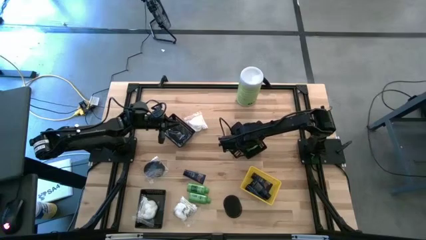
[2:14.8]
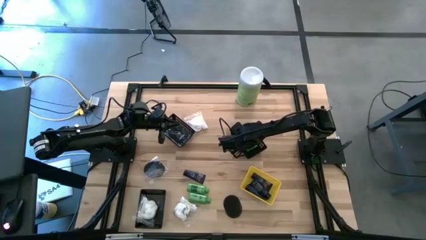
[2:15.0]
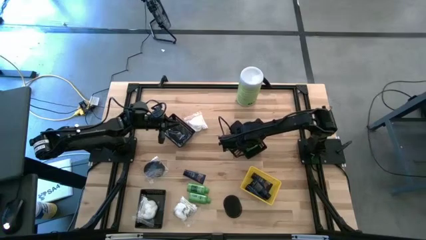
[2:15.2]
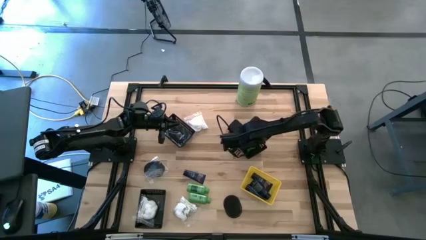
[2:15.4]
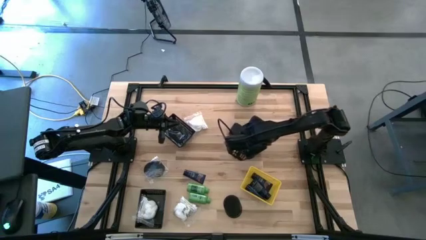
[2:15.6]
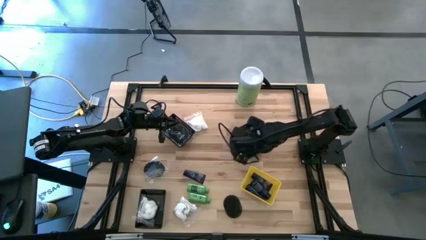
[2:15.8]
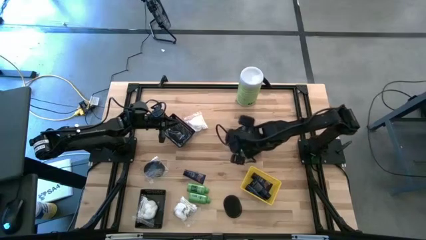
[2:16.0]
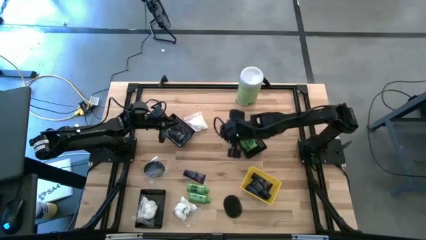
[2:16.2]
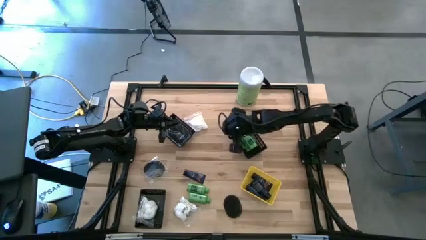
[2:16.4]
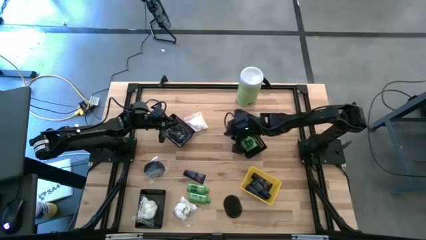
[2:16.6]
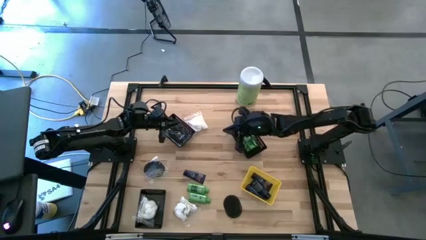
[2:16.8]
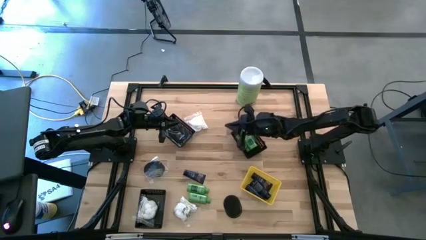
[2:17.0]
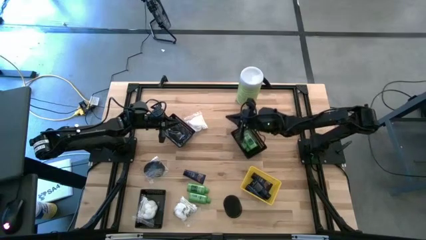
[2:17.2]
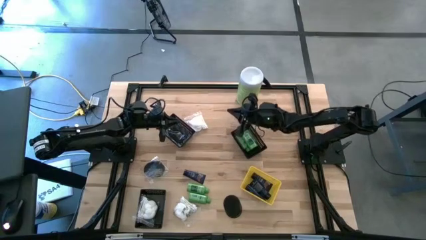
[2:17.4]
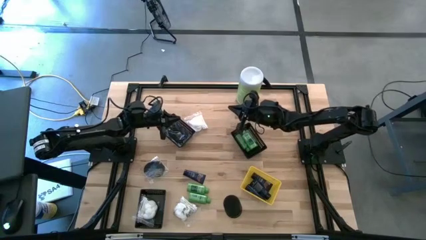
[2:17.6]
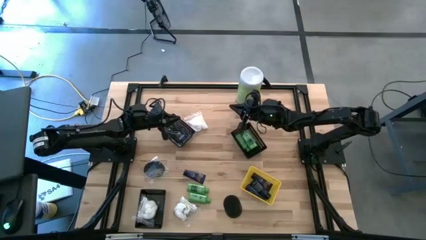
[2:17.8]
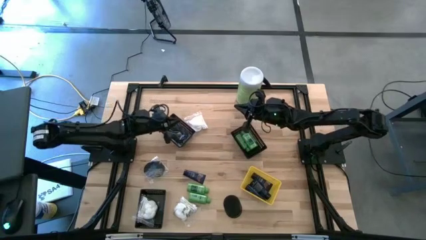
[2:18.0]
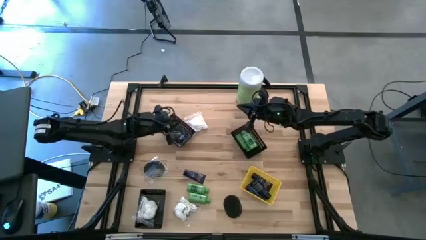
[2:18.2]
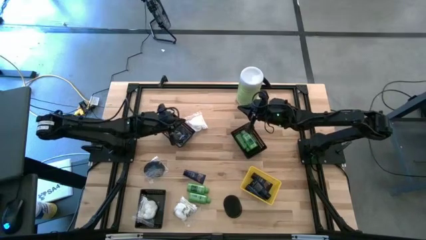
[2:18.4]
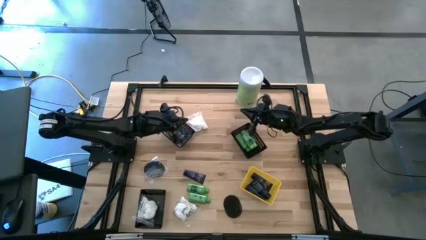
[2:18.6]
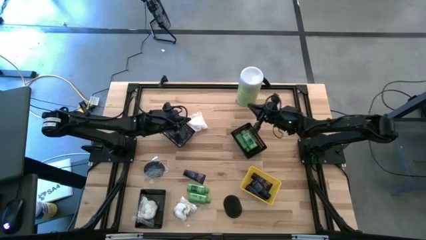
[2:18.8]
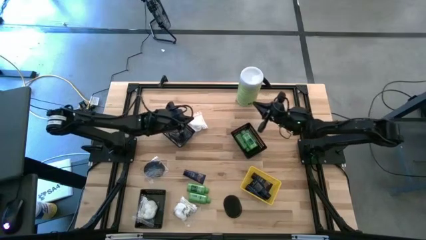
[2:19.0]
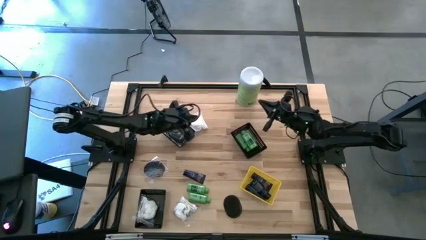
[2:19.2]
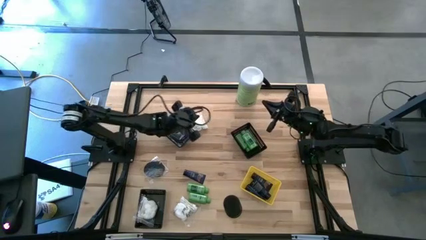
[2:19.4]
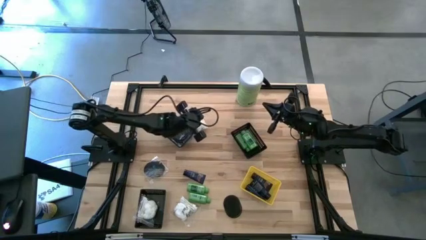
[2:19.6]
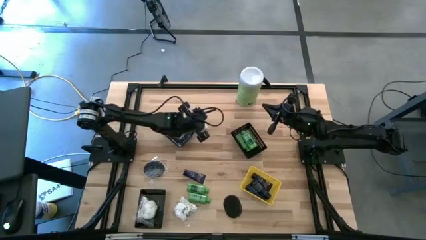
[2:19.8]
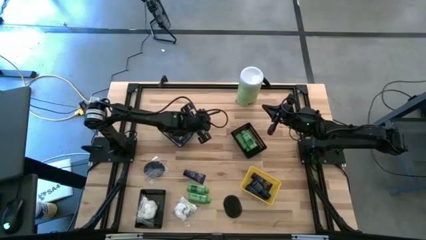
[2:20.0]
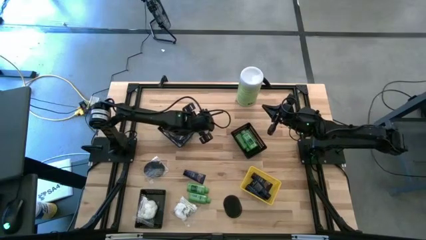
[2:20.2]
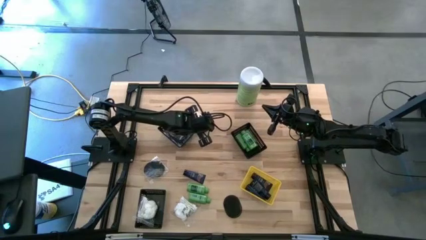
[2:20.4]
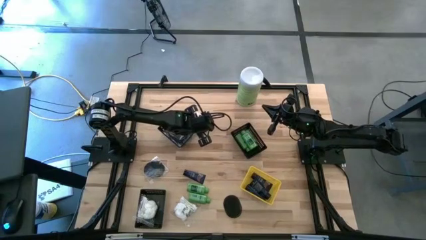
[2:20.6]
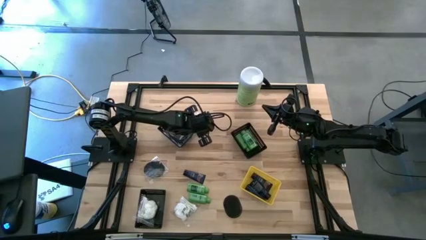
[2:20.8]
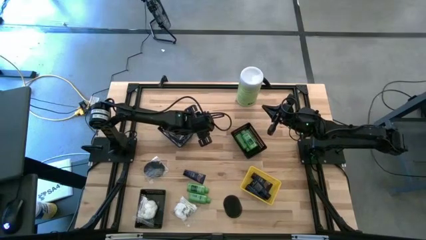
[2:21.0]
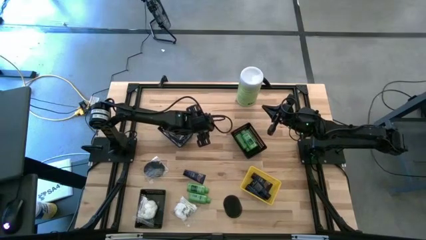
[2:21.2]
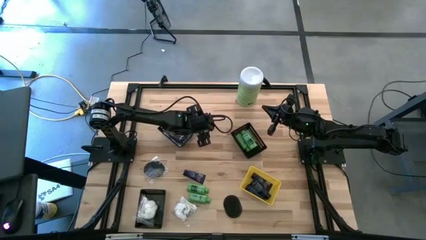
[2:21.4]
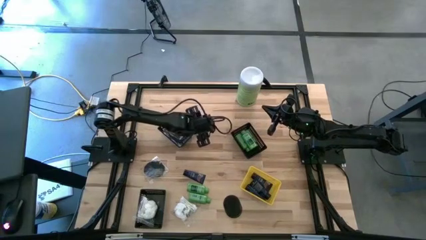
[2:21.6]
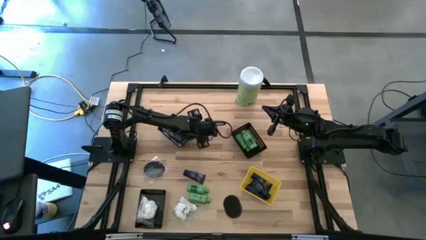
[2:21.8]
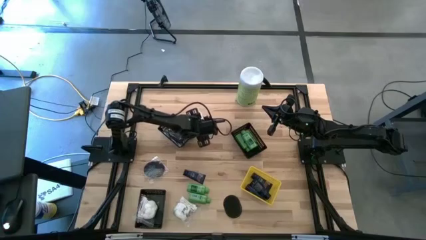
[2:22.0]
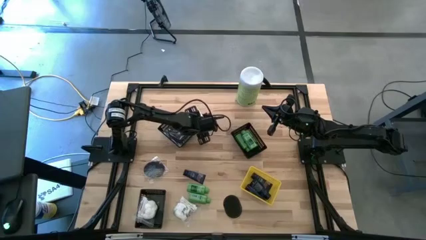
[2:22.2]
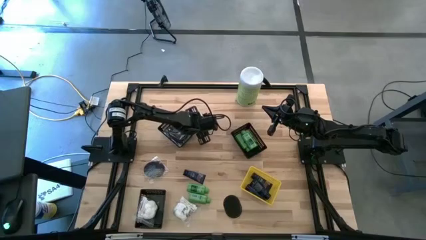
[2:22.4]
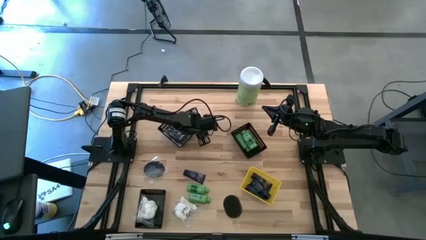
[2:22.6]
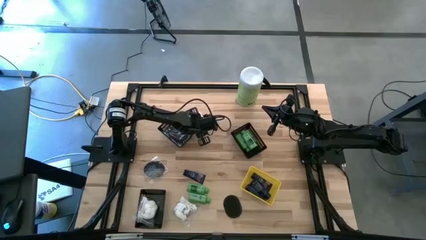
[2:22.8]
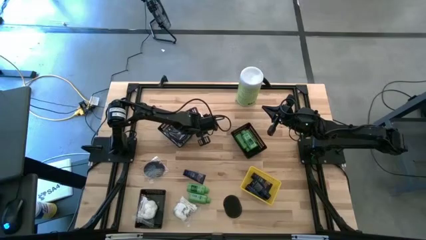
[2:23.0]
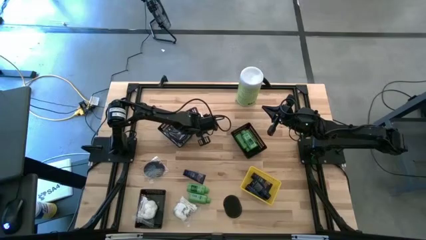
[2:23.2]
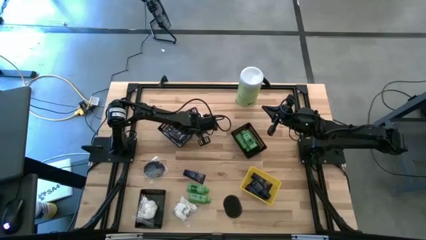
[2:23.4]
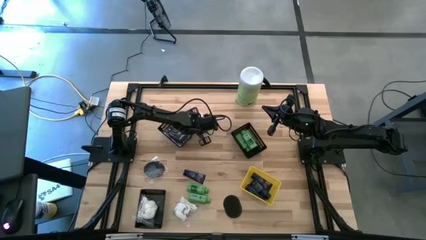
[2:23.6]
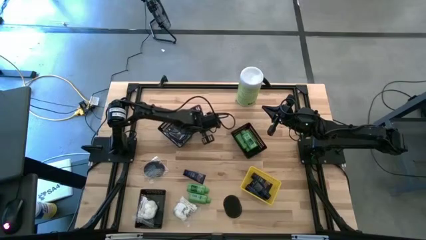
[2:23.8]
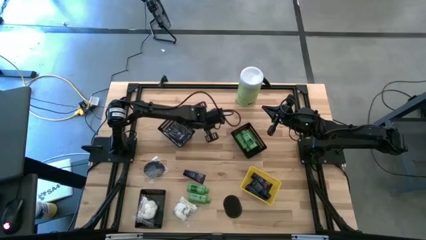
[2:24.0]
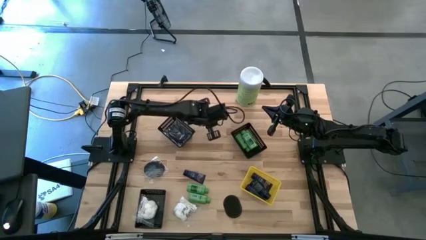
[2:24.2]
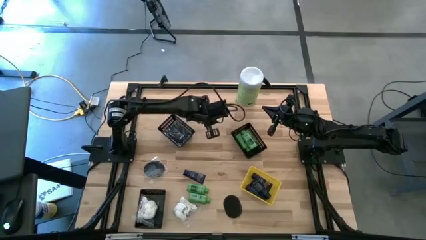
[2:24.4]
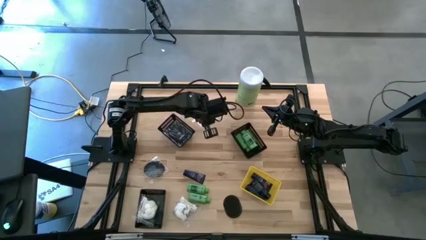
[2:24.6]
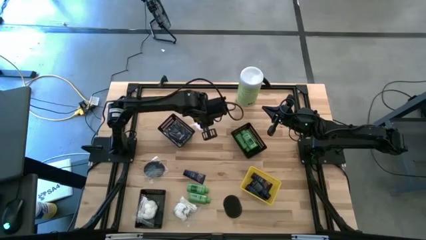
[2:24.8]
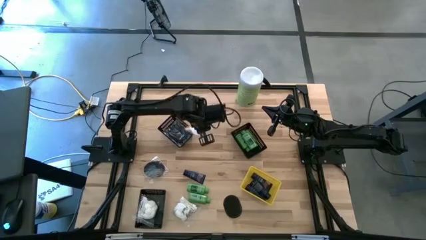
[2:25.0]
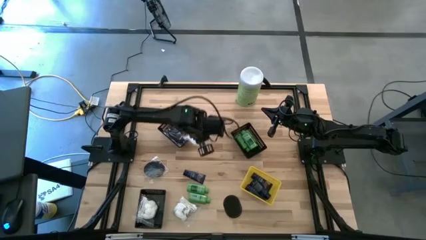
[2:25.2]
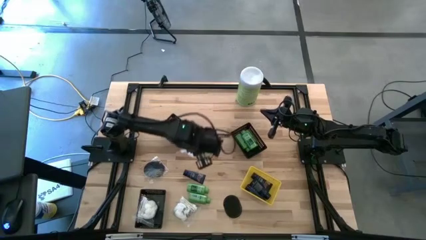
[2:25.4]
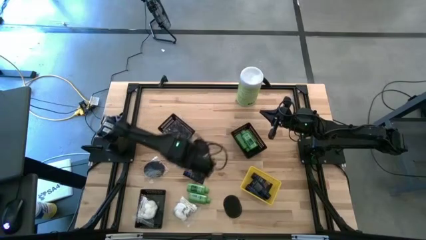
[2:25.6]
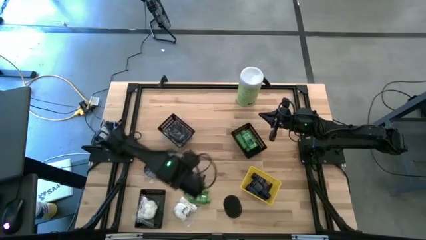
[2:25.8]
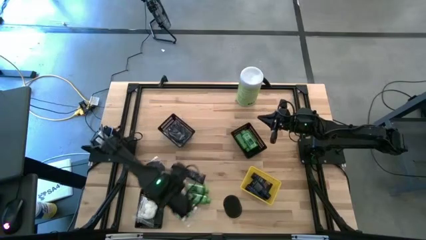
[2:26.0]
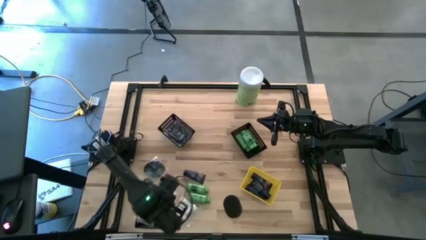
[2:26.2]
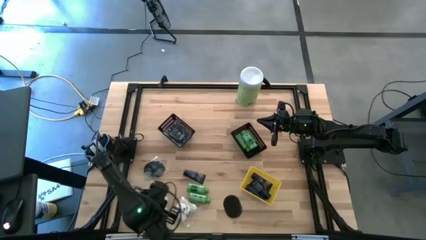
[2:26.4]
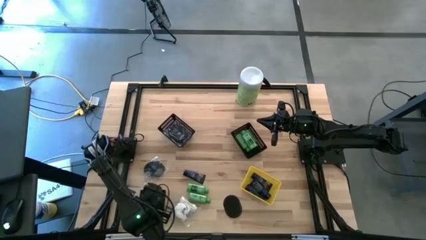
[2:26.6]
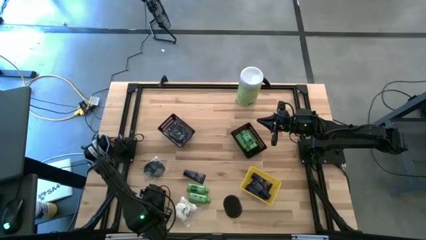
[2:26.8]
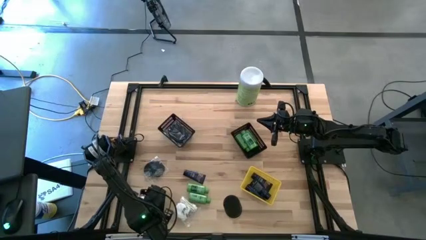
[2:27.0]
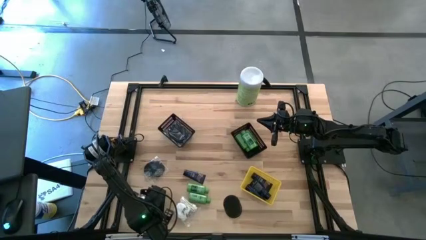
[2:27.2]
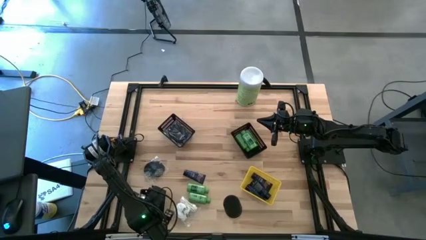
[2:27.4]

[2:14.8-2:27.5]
Task: Pick & Place Travel size toiletries
Put the cotton pack into the bottom left black bin

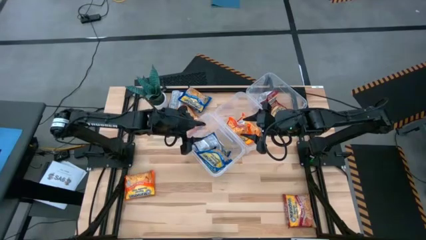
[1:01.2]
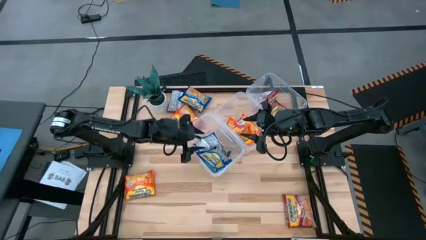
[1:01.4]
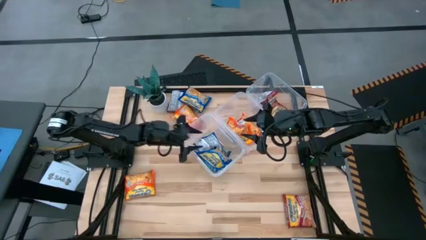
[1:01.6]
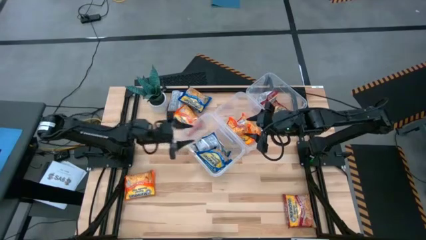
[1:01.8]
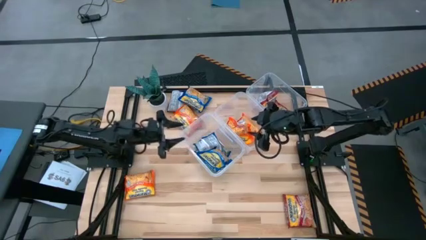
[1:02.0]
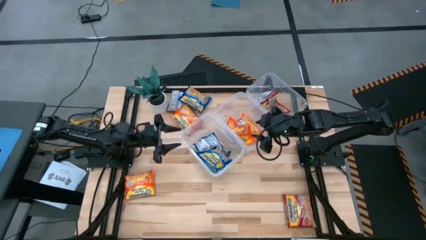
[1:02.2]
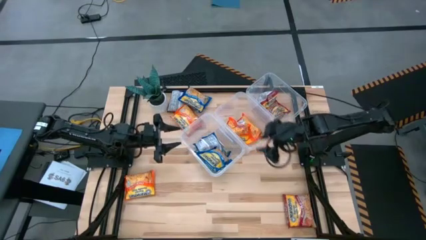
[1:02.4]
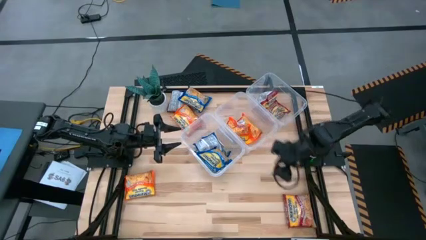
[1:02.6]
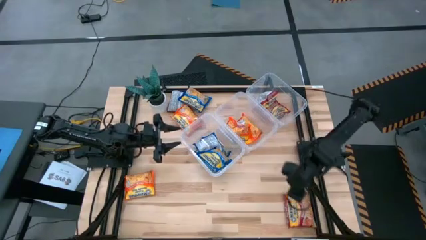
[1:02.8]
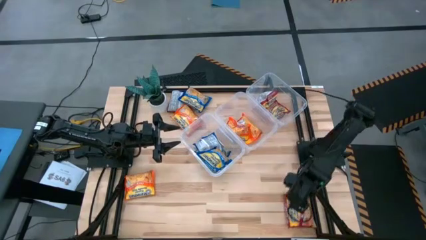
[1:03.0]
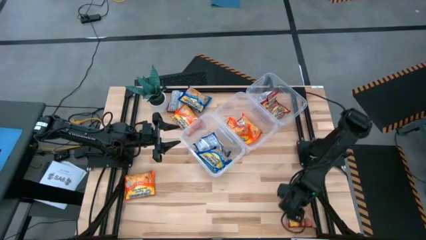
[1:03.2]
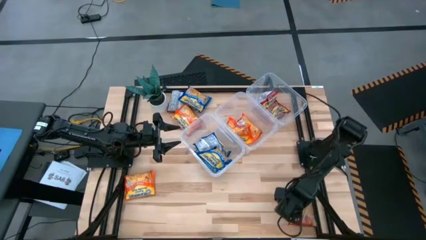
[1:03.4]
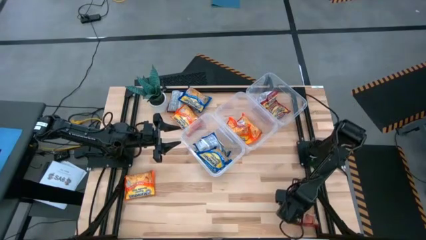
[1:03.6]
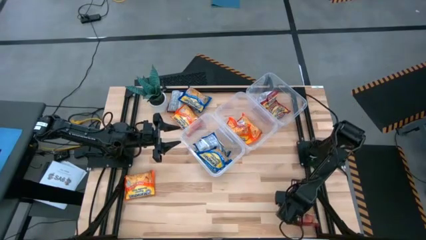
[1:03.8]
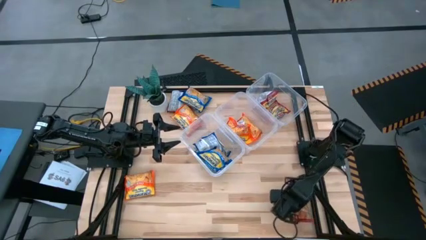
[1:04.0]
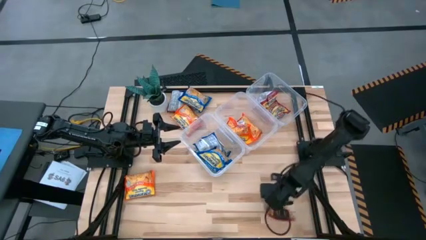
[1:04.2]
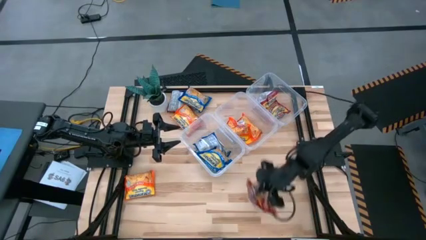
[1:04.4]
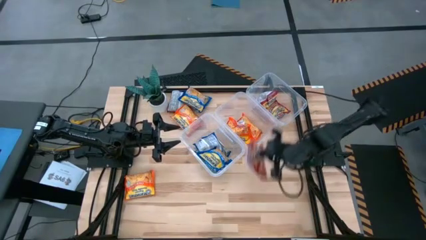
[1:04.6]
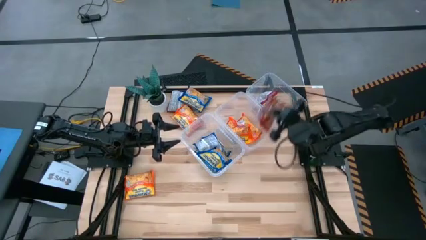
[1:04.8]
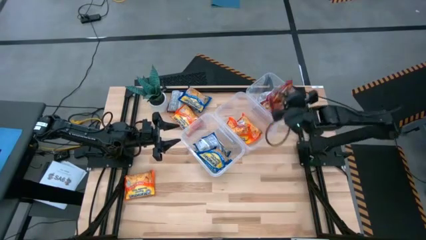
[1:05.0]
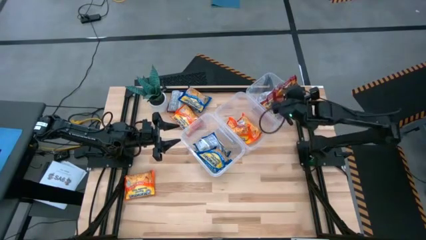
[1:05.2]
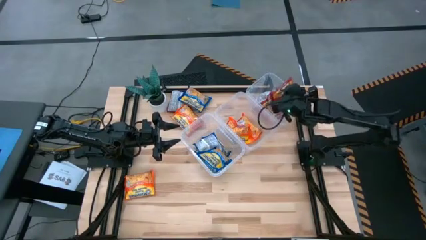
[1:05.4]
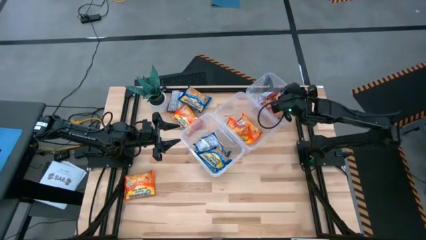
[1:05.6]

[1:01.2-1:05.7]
Task: Sort Maruchan noodles
Put the red noodle pack into the top right transparent bin
